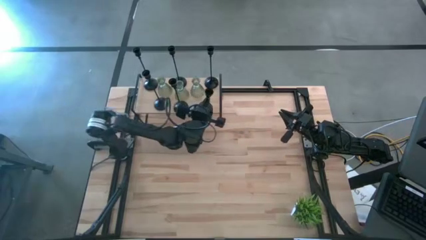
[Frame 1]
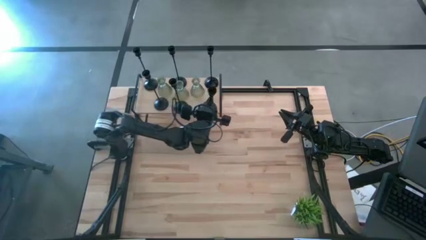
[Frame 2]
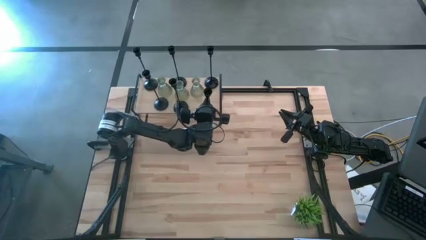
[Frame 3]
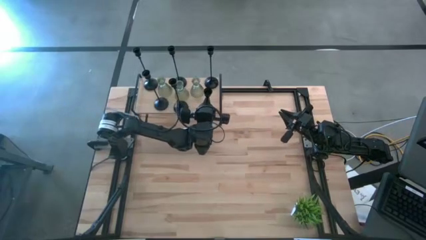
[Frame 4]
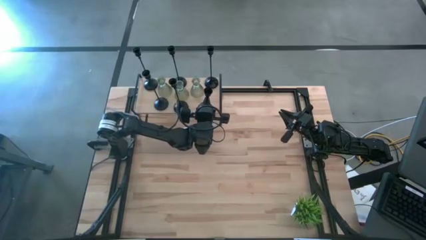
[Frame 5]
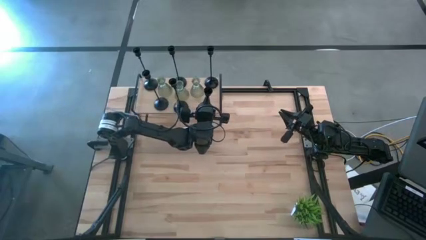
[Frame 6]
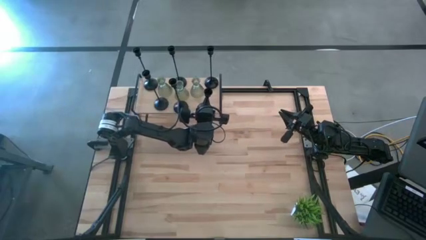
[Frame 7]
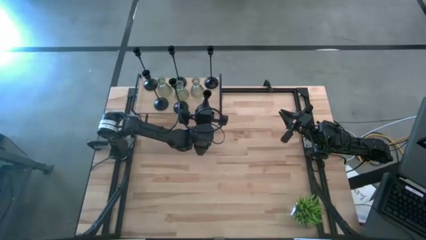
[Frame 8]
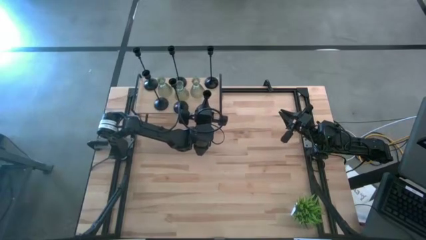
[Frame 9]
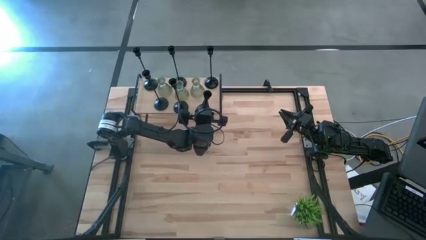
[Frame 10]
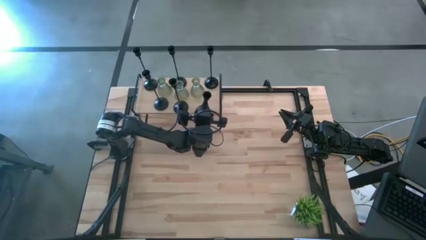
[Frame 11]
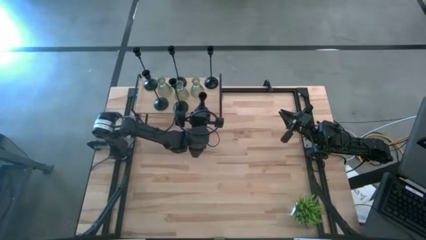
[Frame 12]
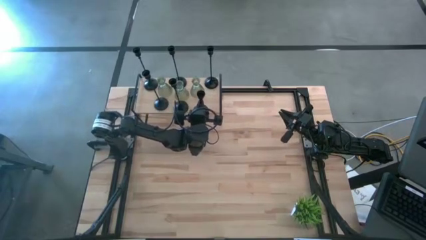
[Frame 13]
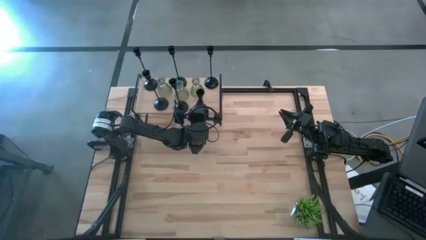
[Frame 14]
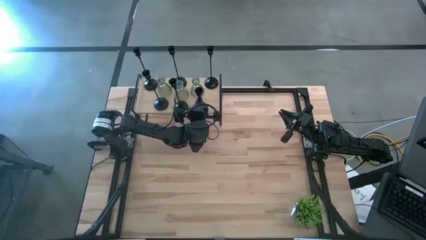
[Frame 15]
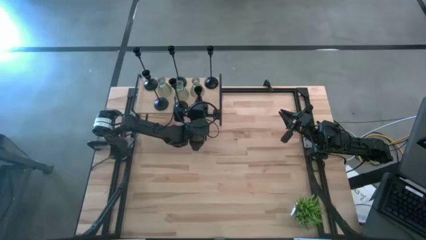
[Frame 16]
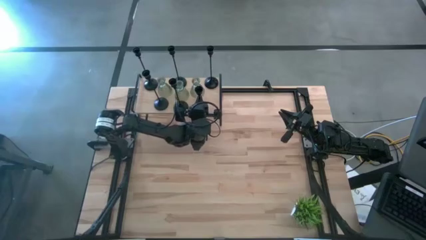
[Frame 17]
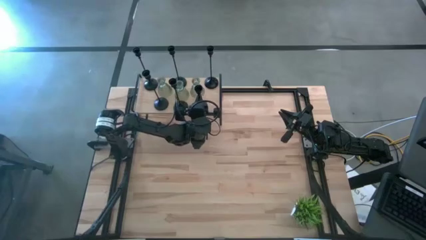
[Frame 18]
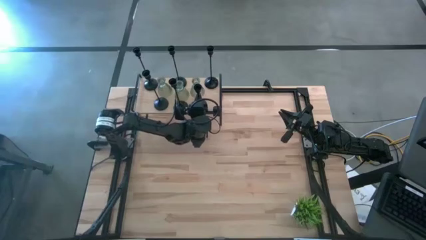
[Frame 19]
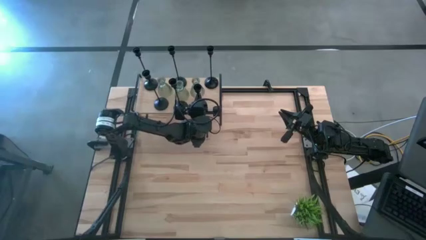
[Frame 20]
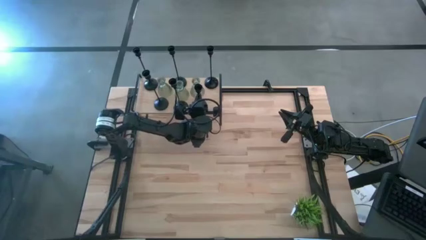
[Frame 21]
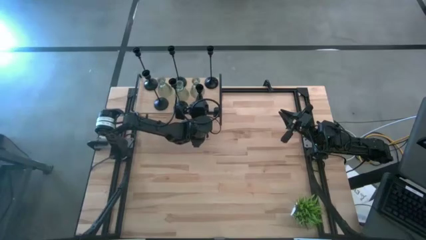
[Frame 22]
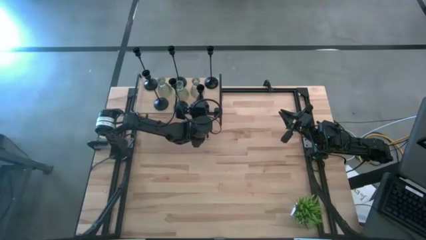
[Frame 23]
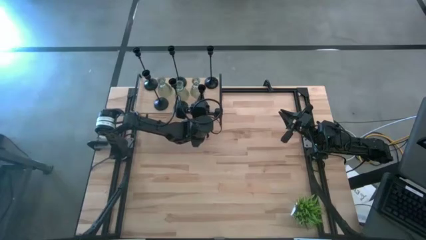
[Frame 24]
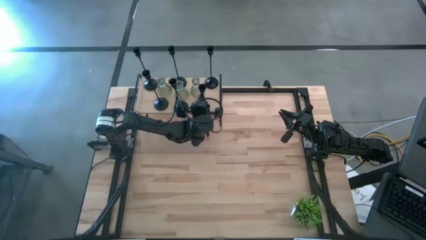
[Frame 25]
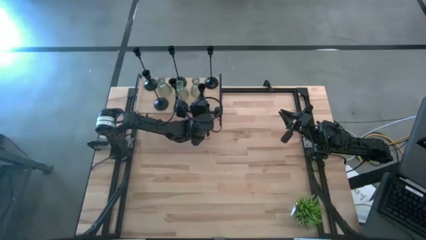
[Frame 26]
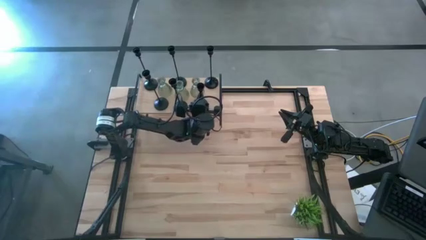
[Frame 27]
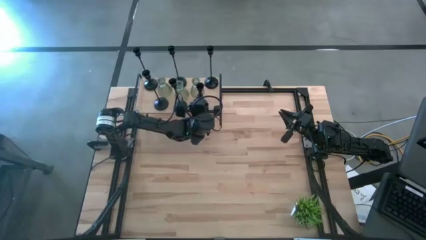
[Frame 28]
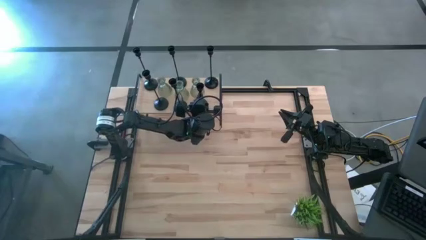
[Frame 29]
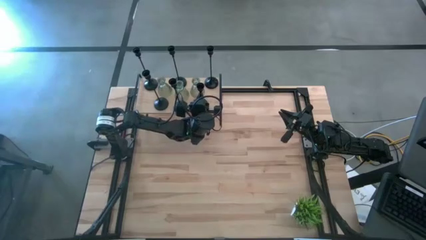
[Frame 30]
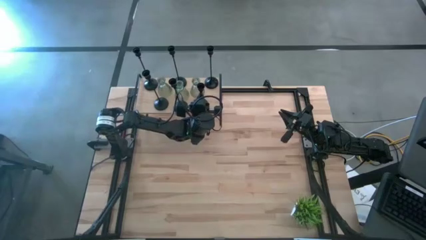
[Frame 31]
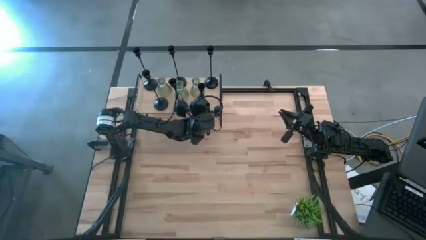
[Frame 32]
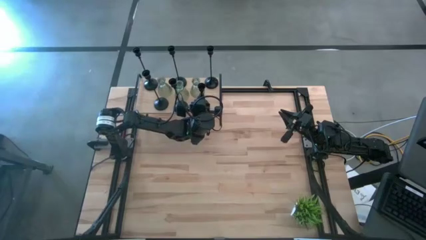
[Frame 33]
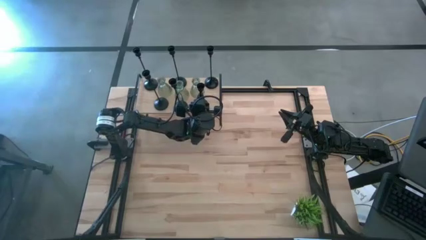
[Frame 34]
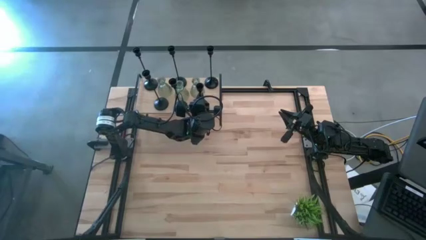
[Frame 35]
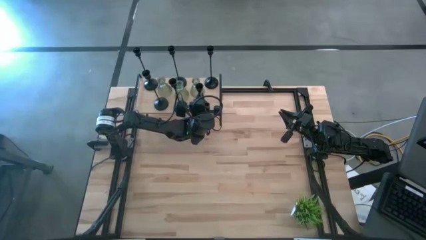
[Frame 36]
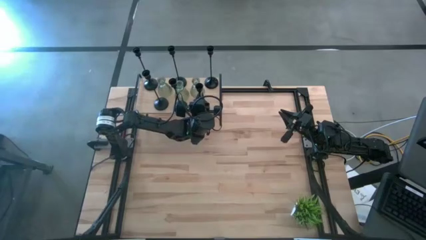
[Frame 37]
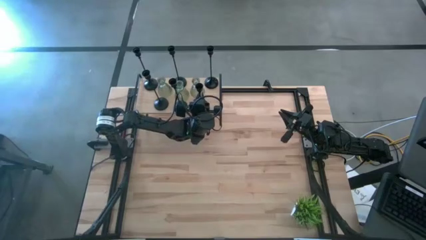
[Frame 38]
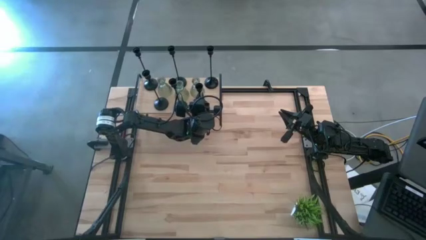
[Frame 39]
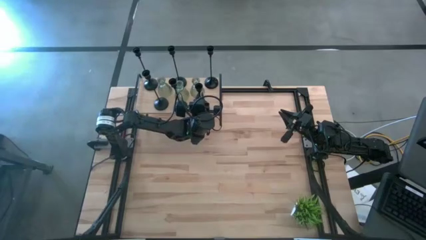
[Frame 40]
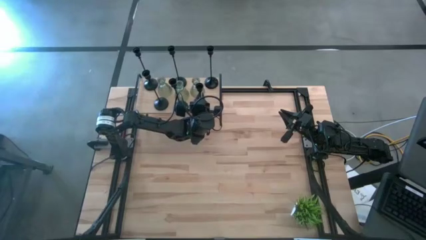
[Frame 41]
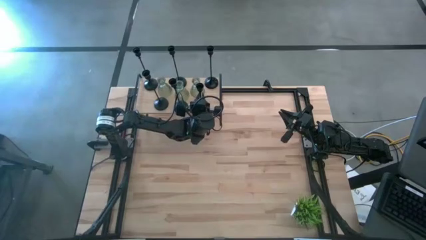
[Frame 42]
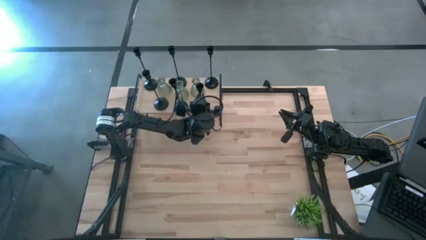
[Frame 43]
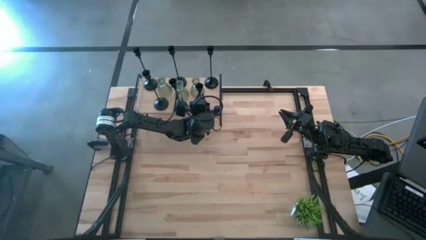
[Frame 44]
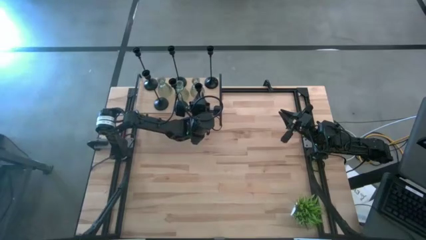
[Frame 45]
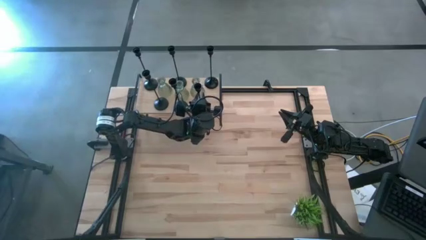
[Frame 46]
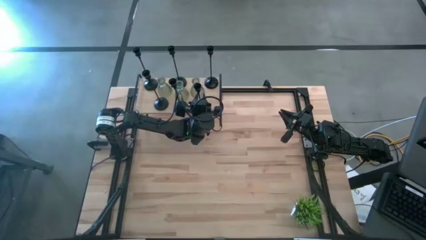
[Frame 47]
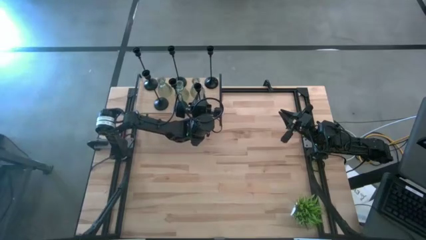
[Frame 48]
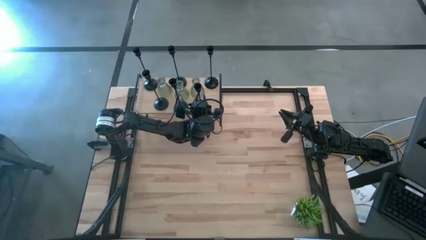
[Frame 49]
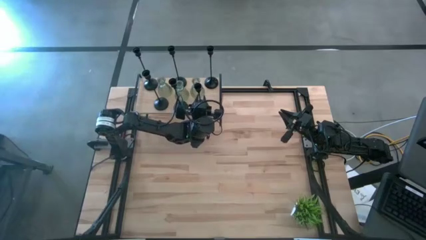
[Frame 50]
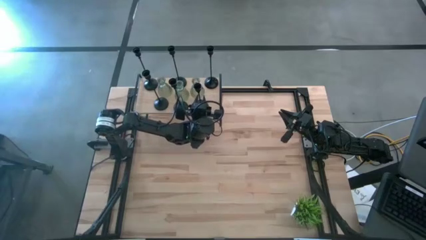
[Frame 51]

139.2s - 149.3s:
Task: Pick & Place candle stick holders
Put the small black candle holder on the shelf

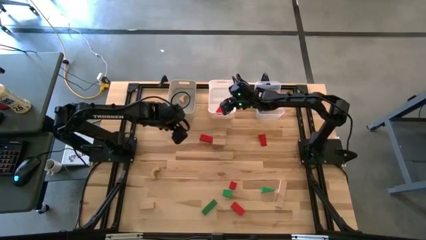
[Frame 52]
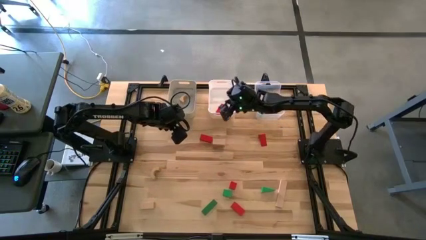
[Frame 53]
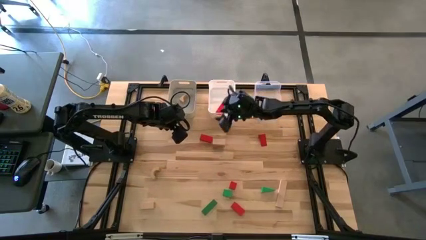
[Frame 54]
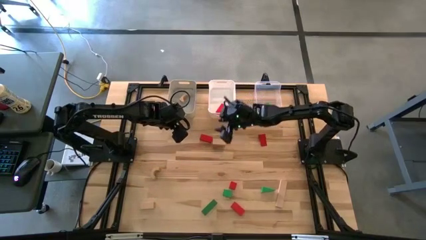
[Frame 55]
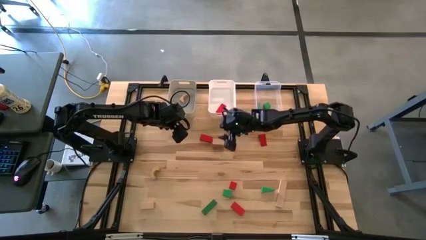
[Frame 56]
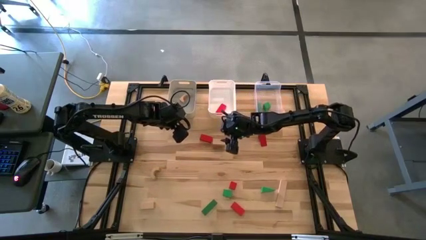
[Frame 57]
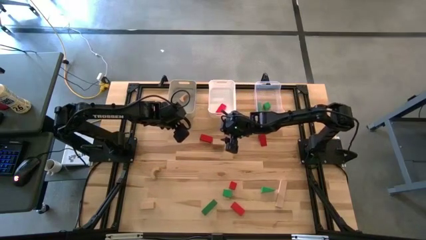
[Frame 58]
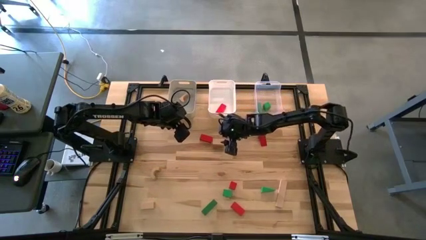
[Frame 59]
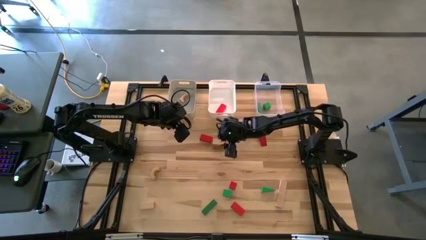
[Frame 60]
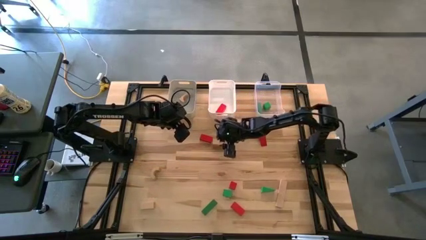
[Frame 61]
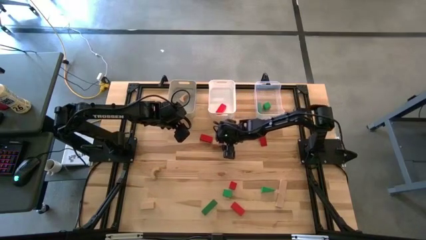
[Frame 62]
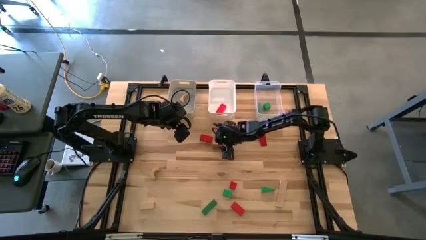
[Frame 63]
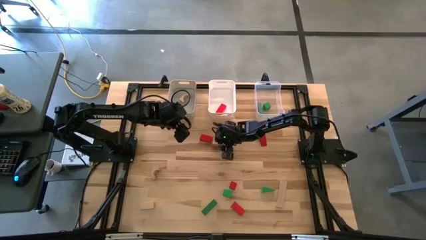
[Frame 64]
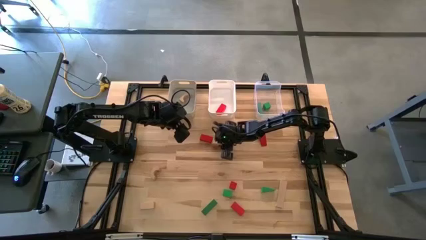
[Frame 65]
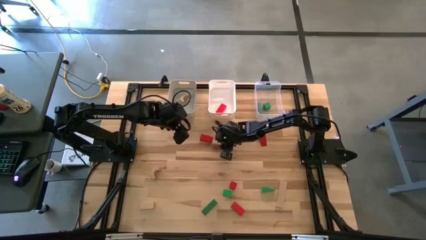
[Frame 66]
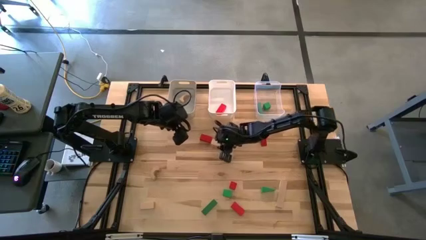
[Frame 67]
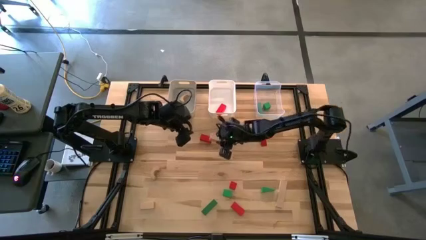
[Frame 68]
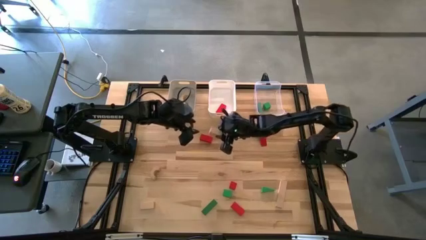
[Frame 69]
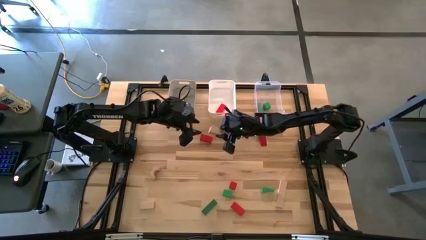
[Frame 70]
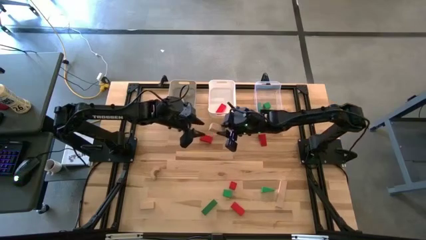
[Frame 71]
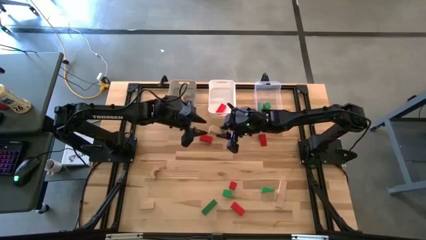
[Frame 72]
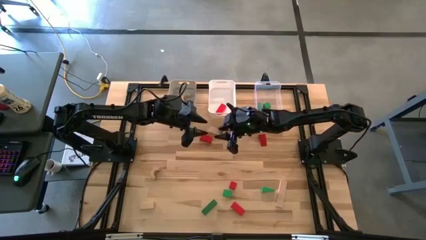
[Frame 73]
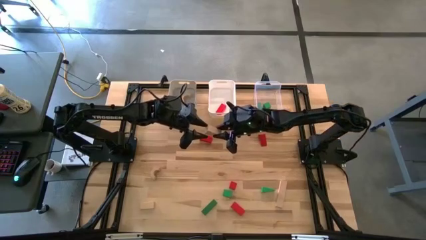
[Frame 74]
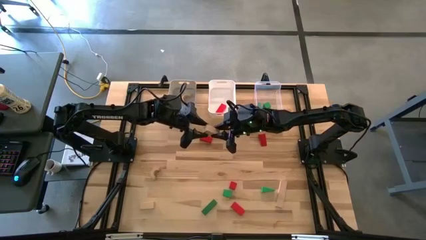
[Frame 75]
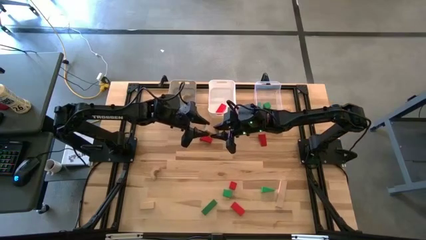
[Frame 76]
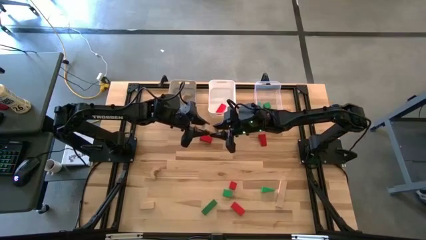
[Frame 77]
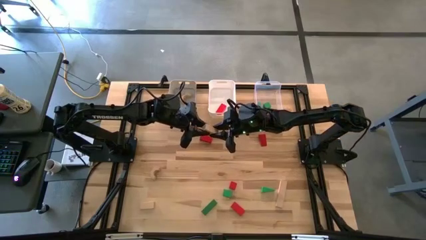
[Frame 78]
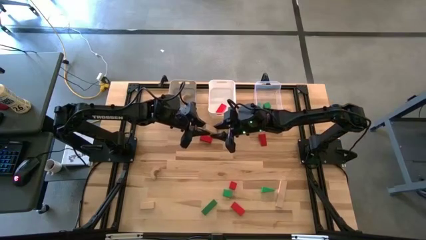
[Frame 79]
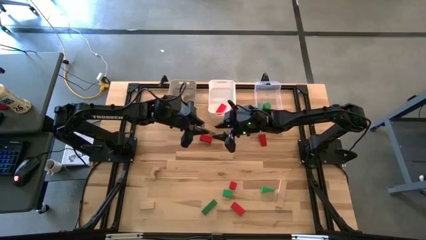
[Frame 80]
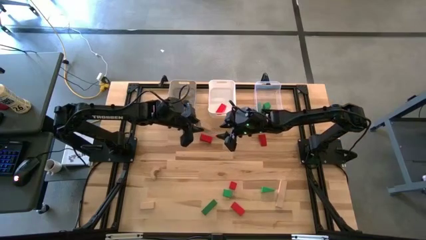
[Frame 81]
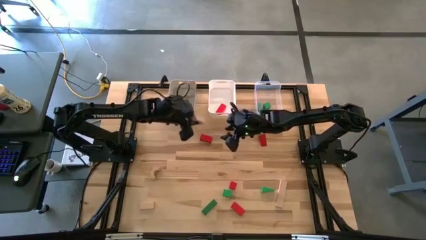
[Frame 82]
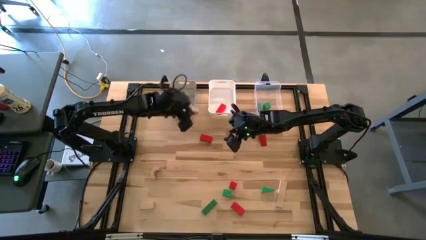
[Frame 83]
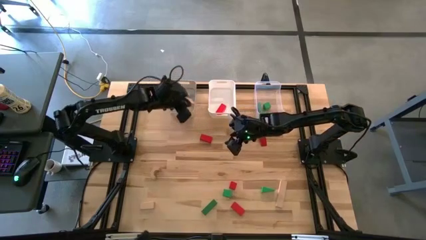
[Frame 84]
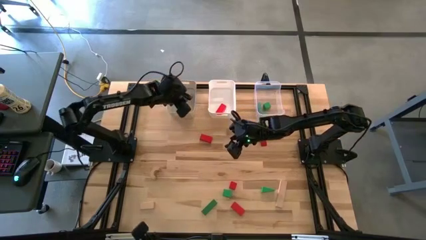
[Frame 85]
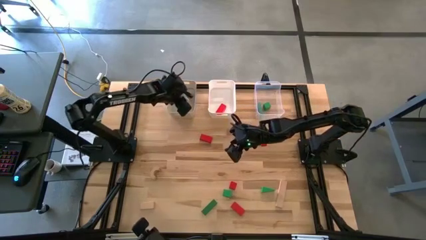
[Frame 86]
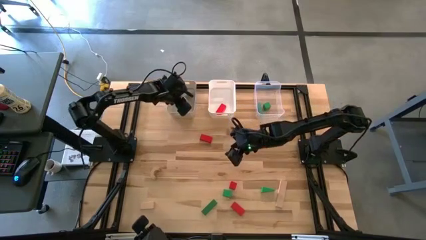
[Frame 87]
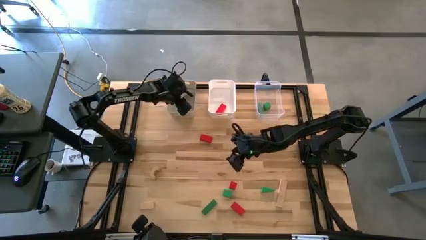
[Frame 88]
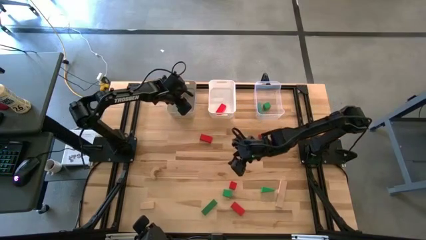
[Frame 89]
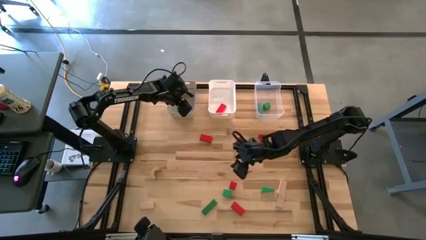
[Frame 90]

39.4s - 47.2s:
Task: Sort & place blocks by color
Put the brown block into the gray bin
